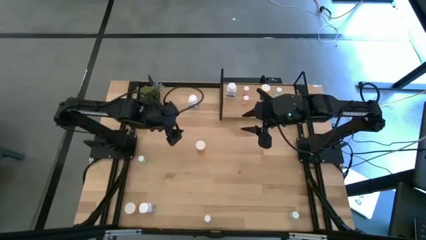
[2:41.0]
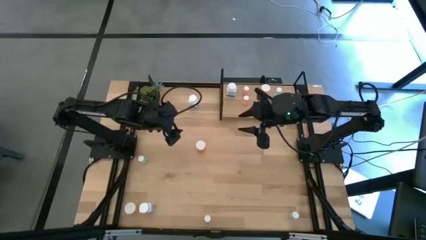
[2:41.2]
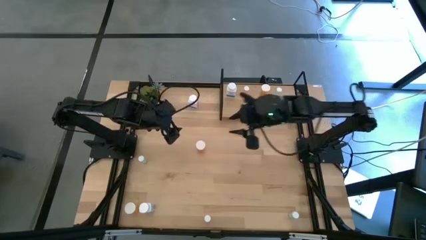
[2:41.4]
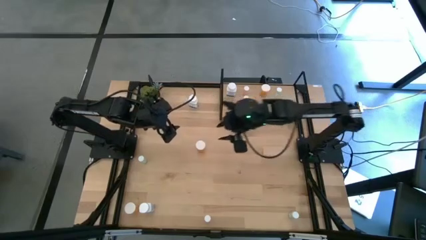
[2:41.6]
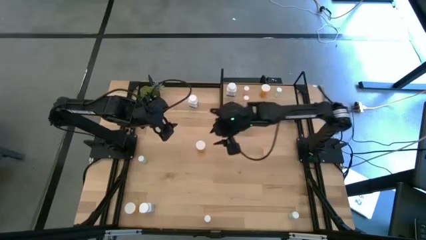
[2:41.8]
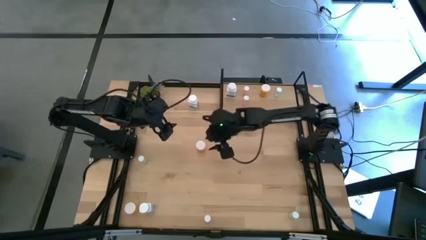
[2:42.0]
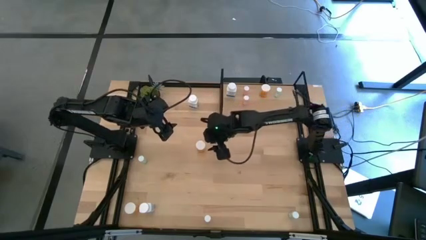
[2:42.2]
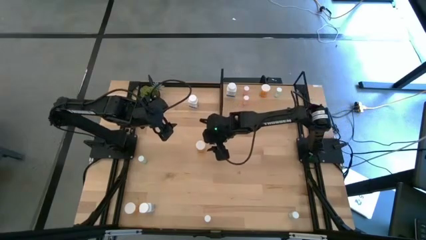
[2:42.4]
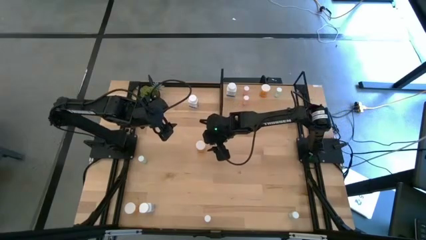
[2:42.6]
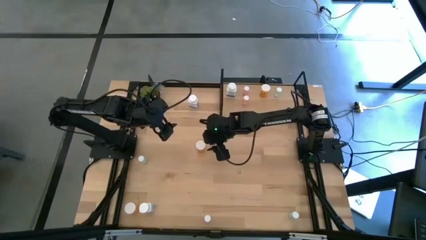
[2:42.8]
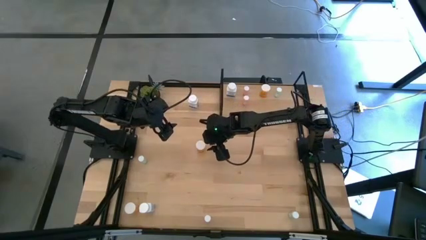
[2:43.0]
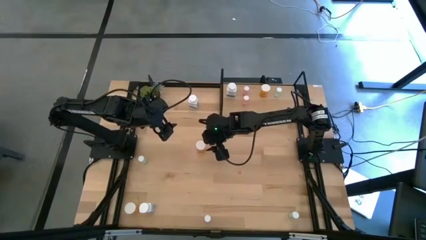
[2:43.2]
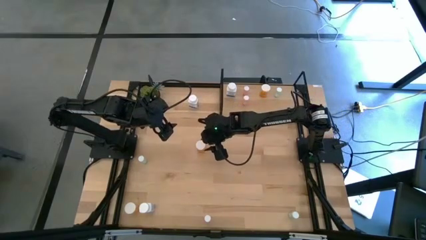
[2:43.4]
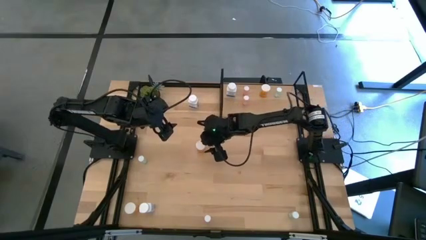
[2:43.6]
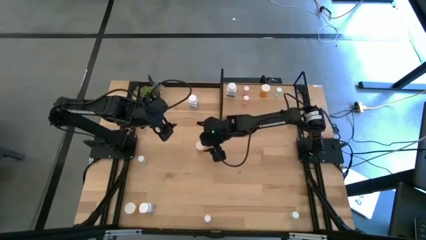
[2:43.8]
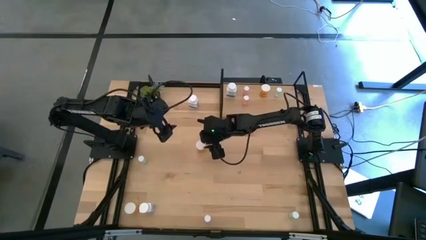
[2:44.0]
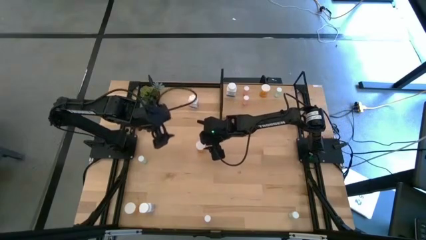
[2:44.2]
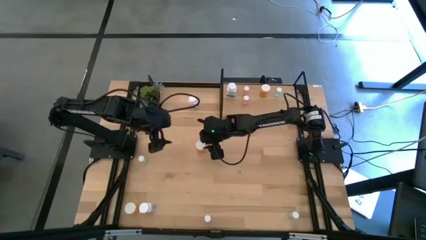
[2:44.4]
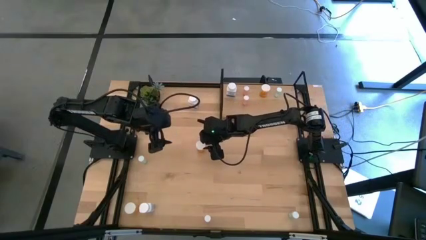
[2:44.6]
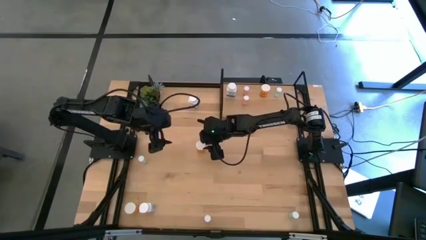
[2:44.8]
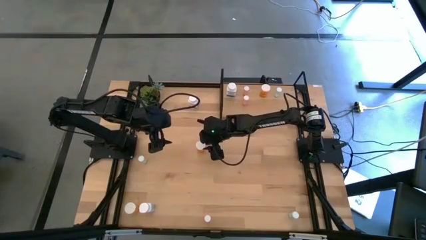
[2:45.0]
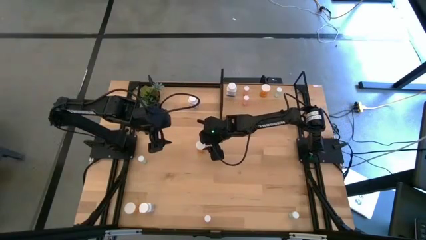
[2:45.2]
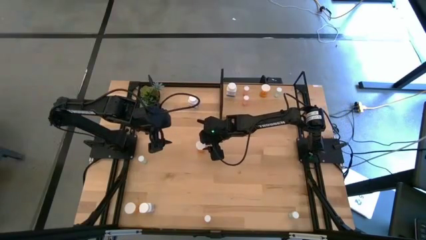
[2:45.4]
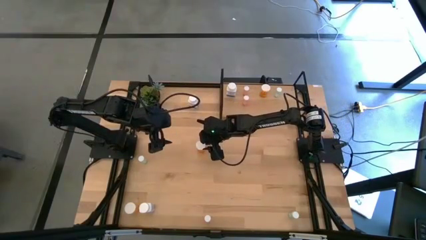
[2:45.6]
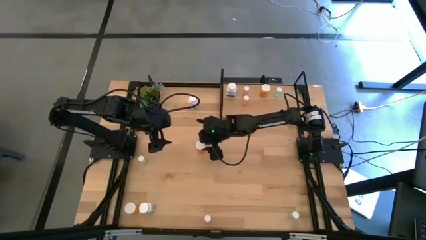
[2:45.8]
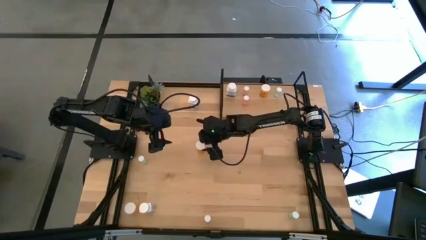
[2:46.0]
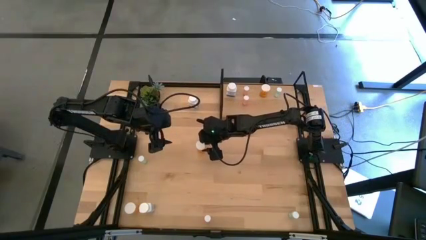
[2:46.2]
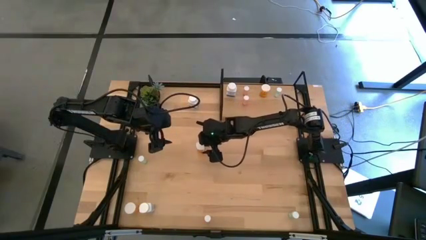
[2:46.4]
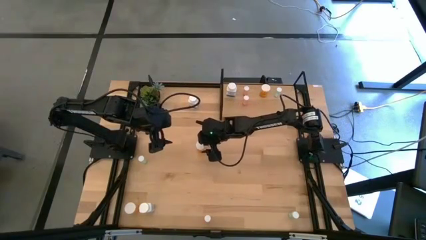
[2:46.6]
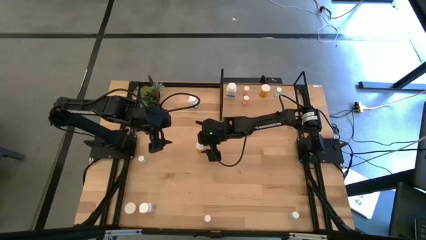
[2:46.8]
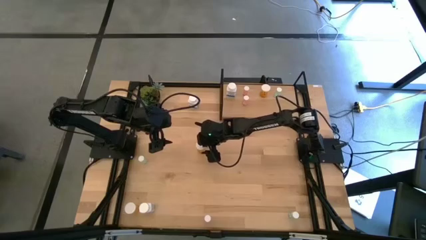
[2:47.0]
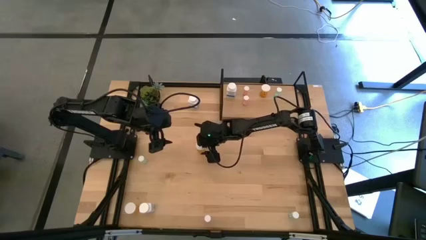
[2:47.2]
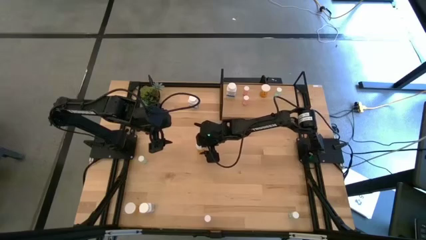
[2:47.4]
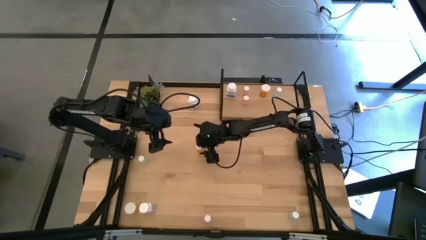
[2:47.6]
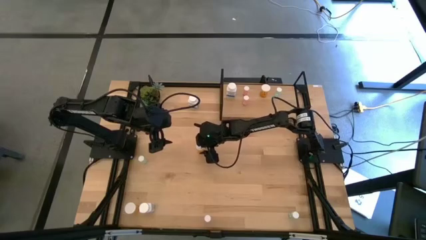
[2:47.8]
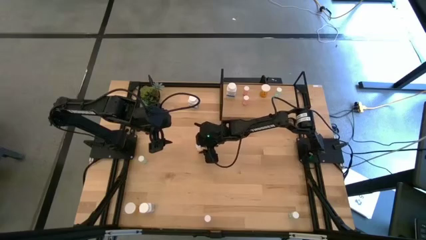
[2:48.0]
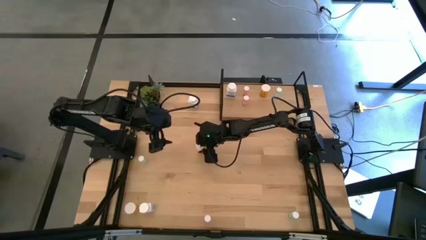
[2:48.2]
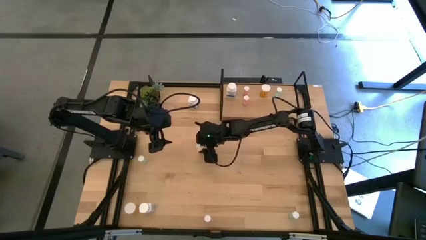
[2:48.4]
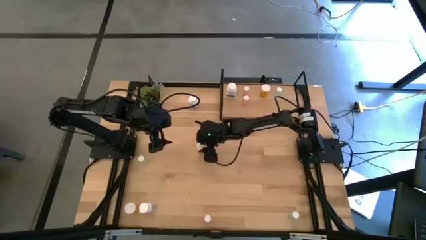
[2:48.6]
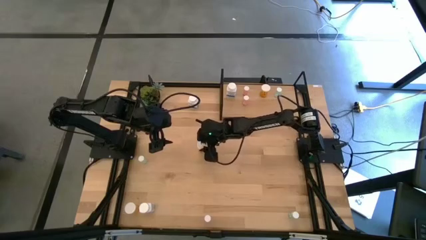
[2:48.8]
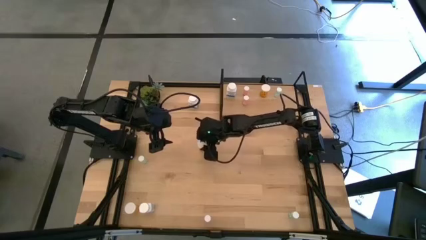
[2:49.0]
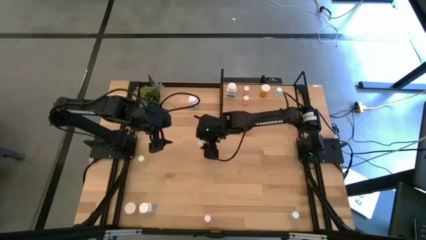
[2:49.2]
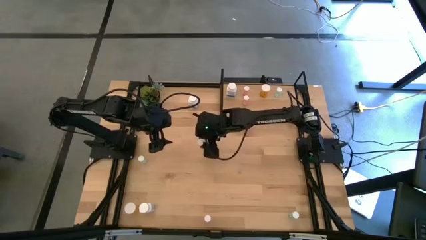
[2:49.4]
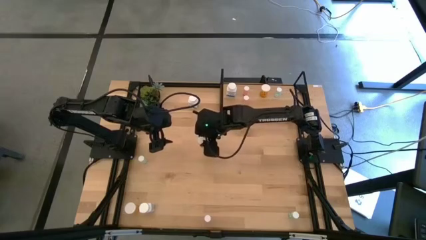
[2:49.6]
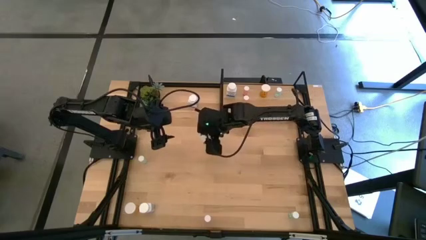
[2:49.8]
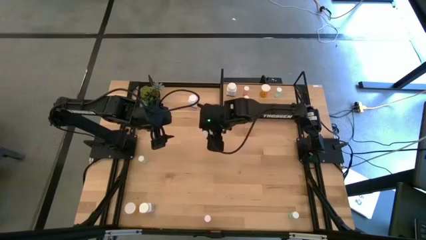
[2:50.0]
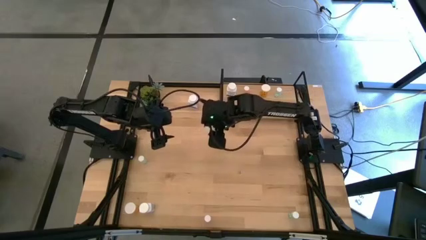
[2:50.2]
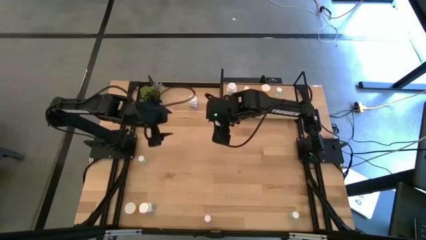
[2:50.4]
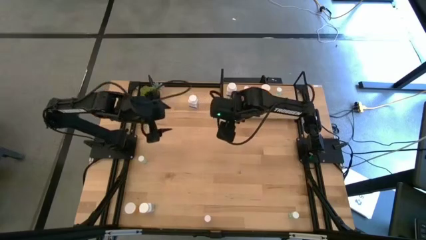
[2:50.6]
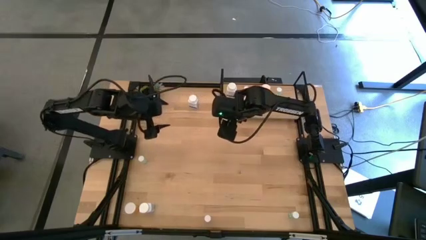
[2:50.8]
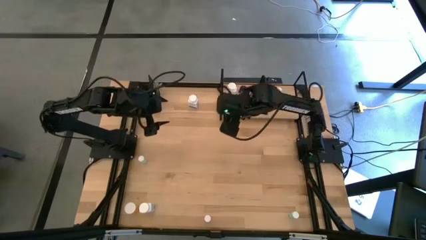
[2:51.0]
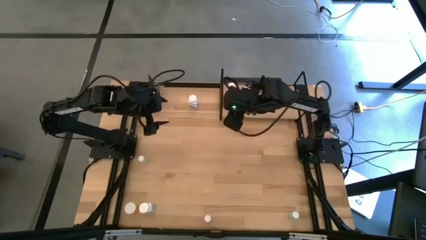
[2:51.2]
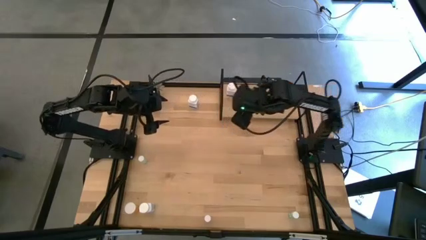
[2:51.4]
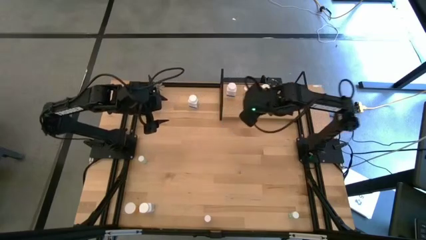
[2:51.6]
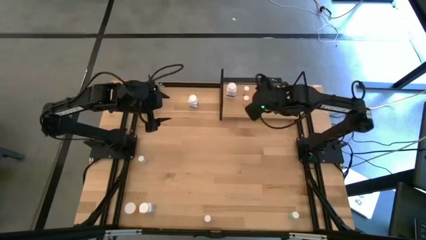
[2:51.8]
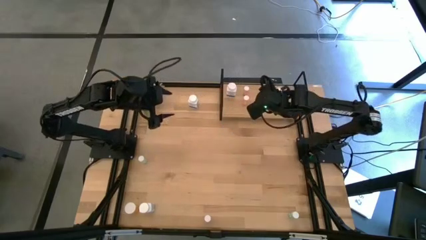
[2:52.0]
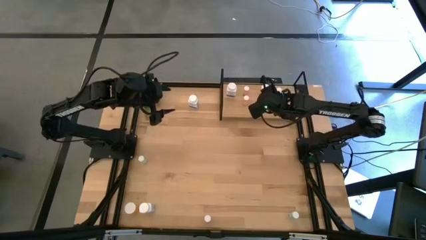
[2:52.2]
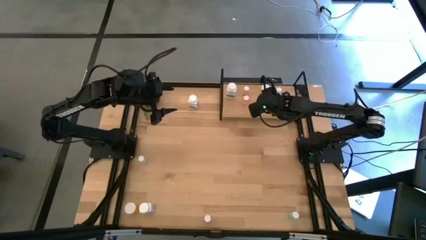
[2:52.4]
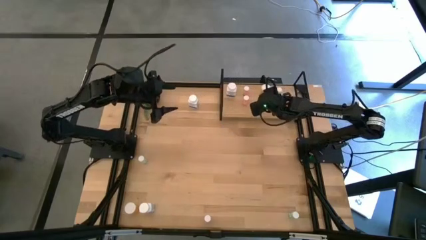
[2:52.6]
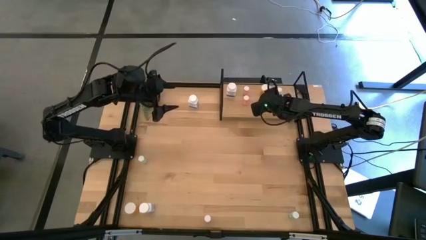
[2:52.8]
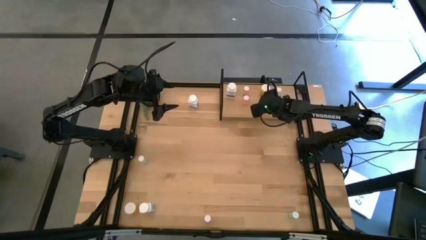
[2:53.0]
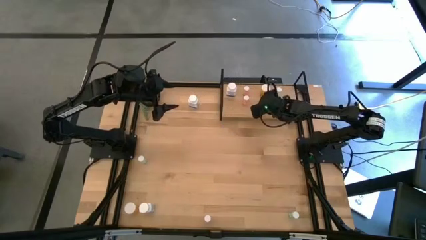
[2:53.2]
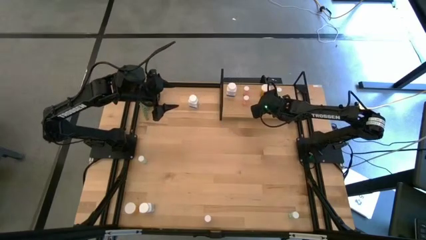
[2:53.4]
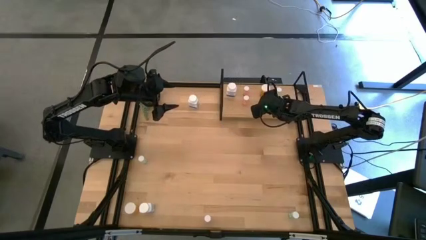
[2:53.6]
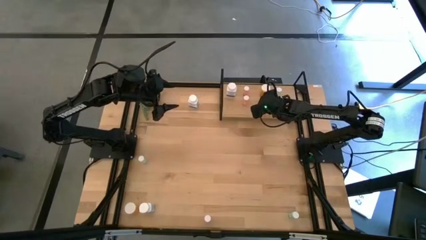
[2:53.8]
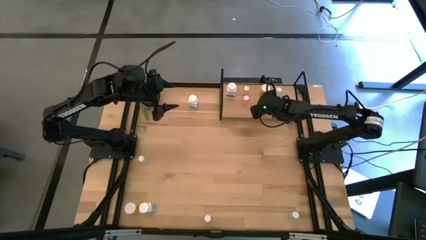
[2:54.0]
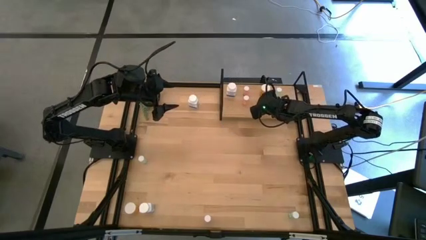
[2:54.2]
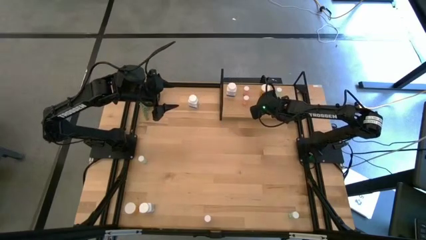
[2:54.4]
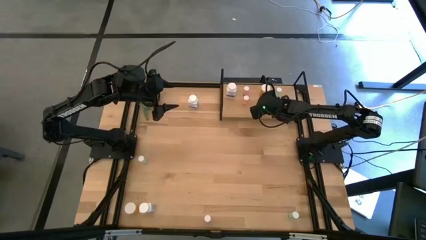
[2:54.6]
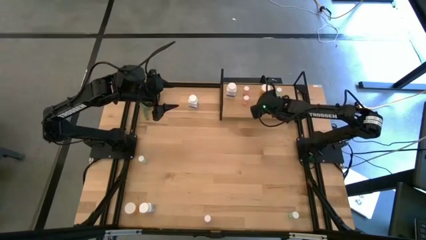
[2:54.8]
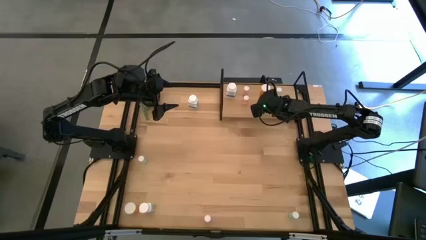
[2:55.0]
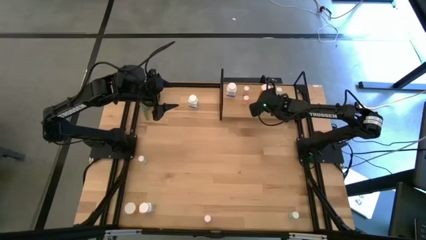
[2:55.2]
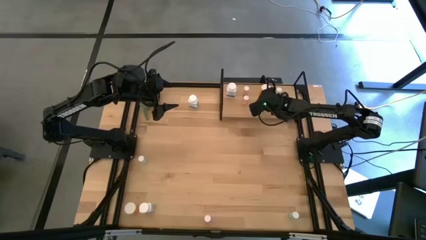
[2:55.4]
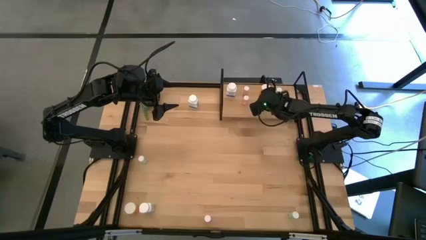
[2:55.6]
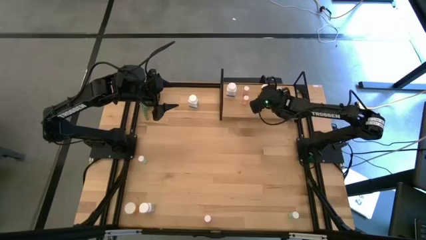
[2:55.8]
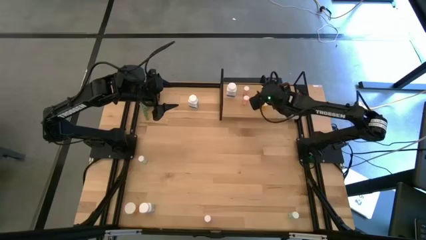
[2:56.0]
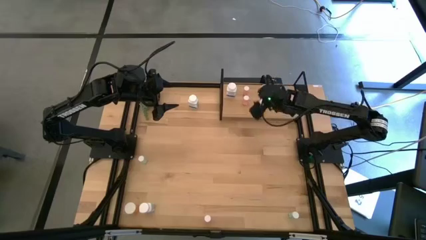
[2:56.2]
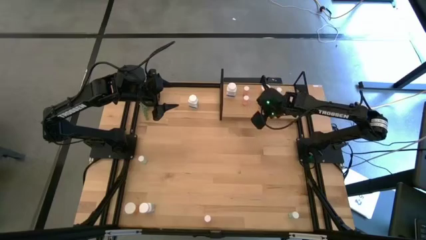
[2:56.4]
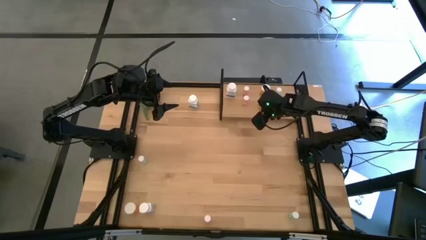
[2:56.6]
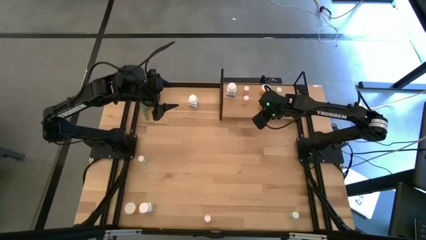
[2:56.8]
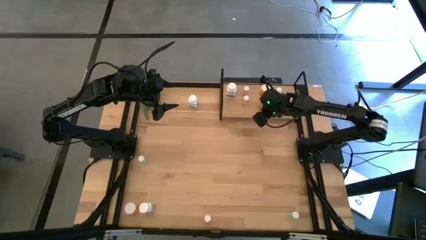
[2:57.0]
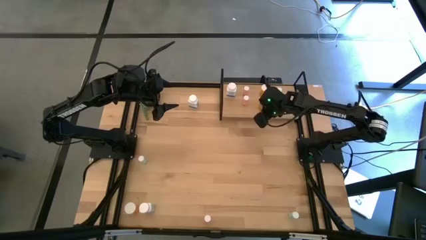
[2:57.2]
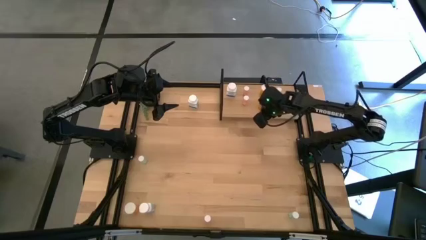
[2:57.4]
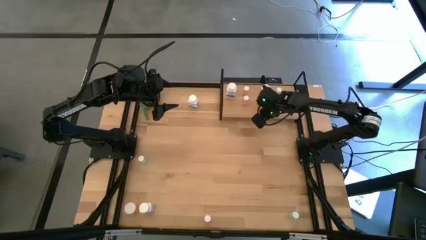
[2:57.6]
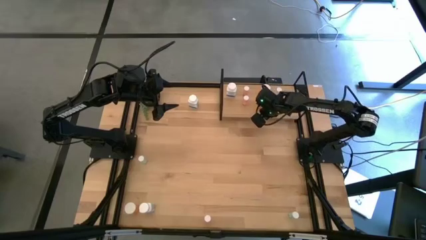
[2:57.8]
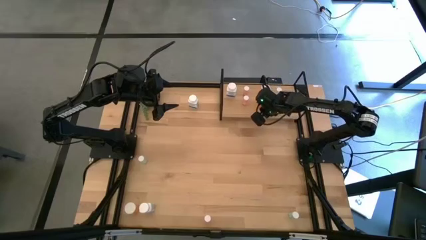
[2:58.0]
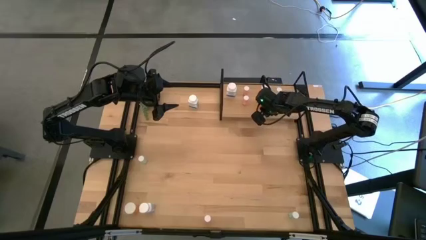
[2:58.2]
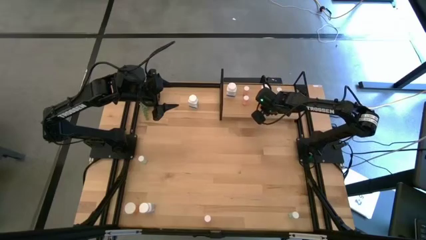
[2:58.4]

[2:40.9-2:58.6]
Task: Pick and place medicine bottles onto shelf by color
Put the top left orange pill bottle on the shelf
